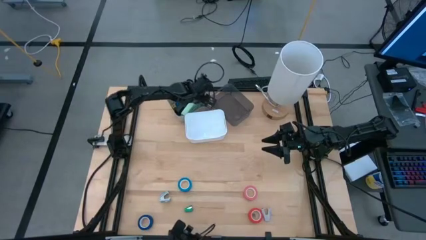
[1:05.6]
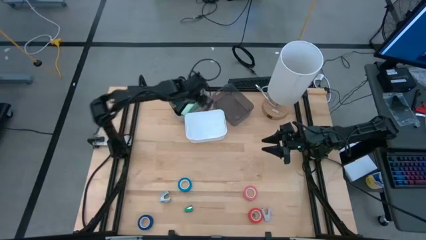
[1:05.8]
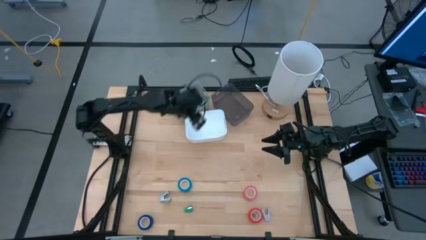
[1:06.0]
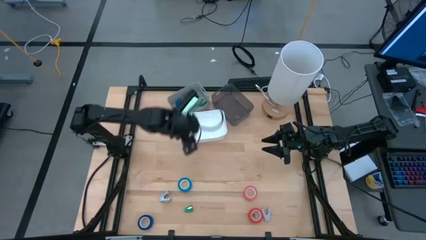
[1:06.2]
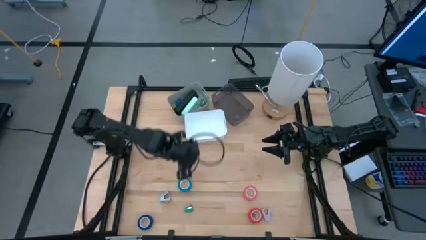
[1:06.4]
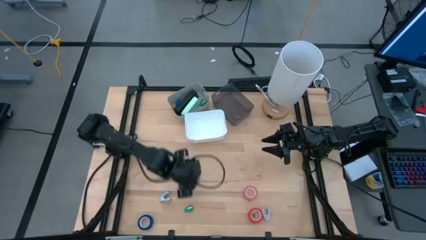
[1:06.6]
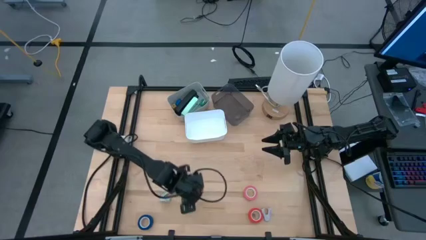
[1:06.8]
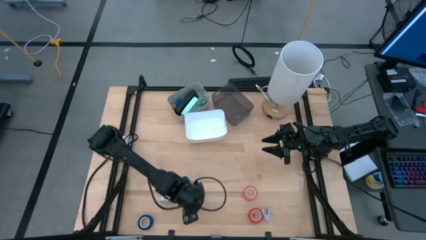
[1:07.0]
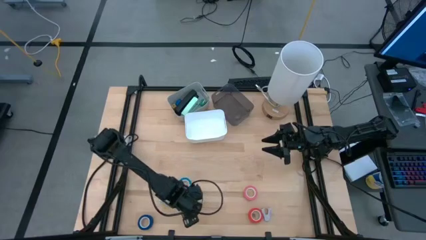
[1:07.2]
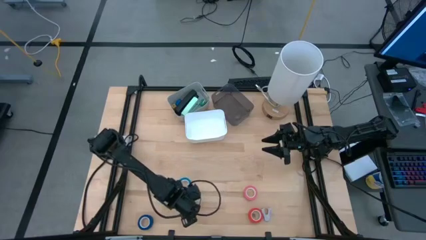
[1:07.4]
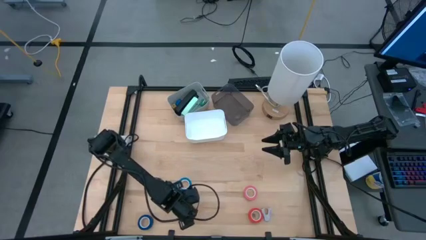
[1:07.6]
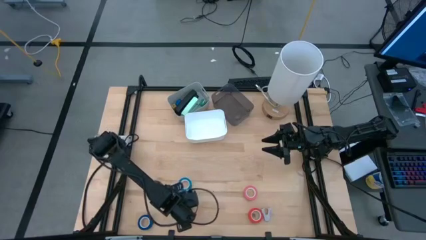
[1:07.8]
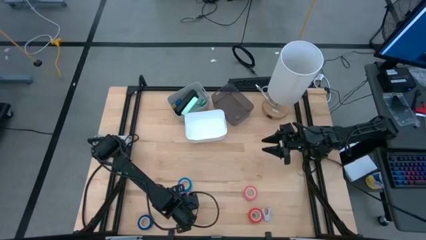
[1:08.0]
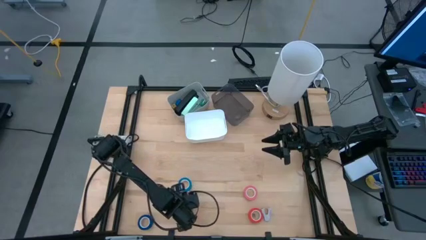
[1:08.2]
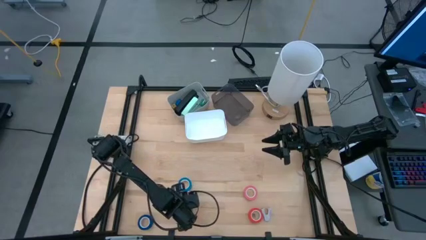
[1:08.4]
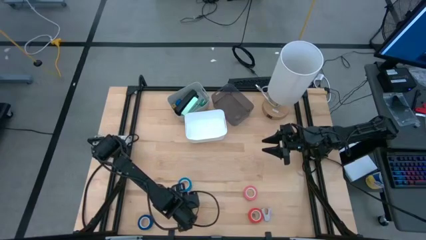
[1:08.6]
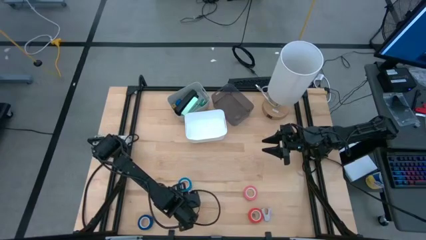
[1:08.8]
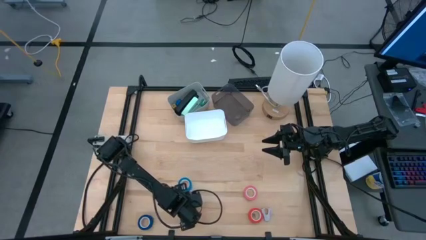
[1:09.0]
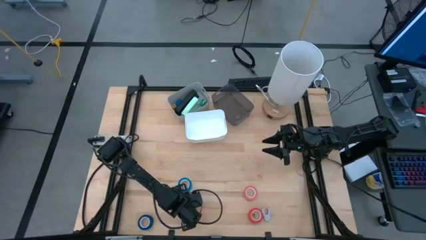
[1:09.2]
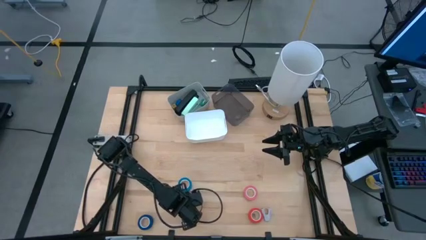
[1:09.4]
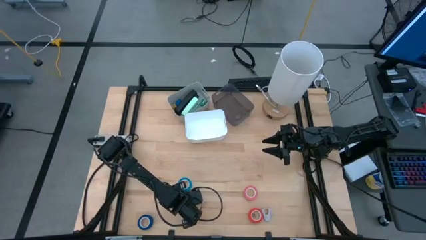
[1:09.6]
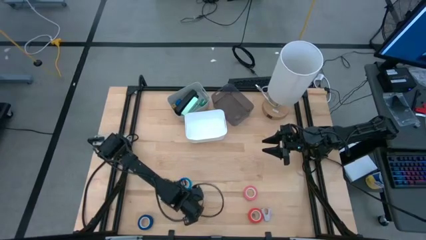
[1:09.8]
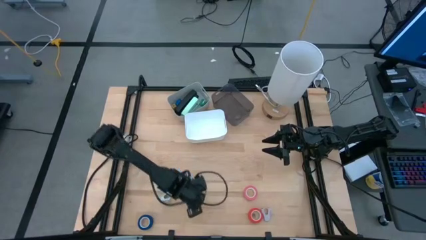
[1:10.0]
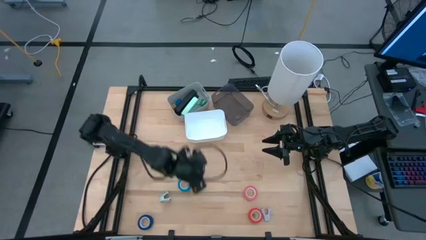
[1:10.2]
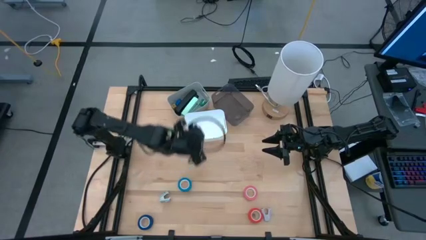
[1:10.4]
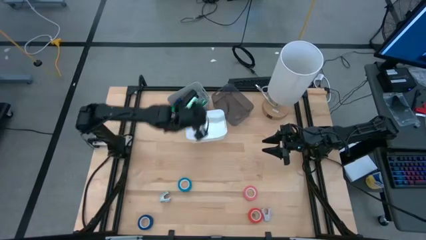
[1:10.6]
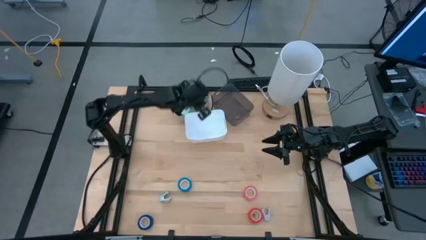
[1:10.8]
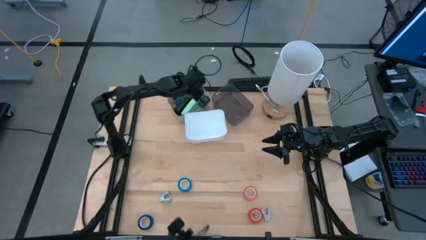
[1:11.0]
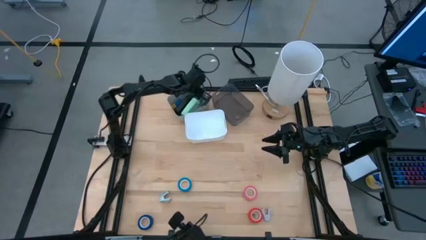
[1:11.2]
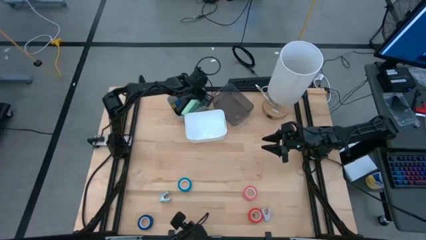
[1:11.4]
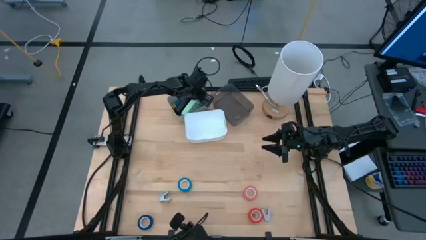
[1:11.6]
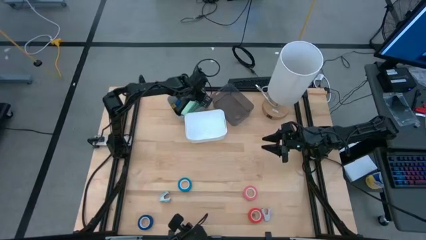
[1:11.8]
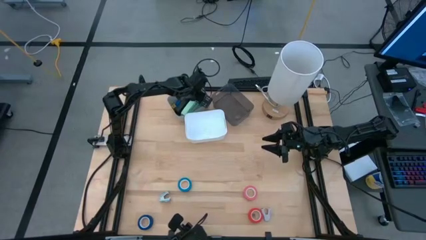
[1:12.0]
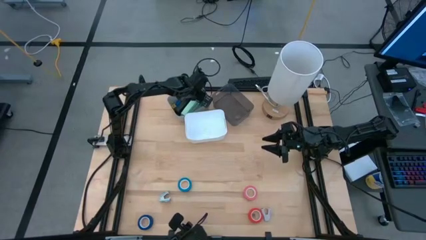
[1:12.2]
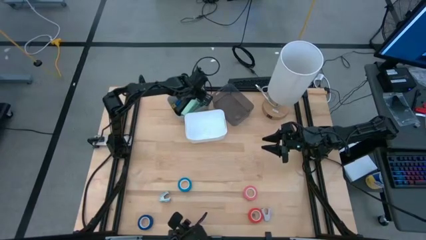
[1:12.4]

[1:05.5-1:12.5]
Task: Pick and place Stapler, Stapler remover, tape
Put the small green stapler into the gray bin

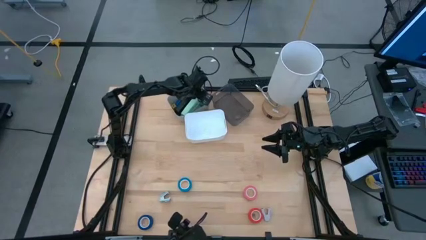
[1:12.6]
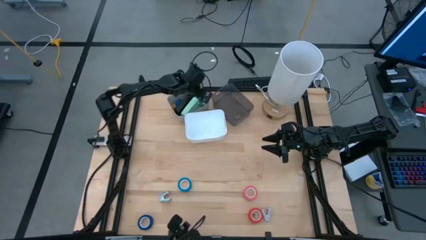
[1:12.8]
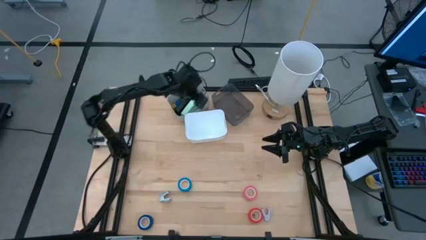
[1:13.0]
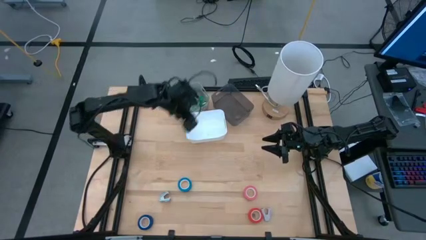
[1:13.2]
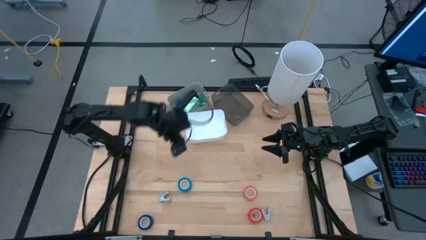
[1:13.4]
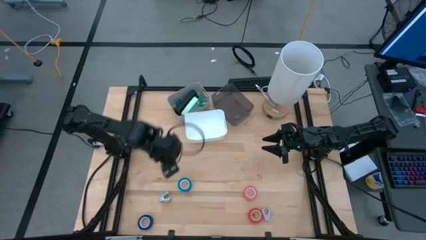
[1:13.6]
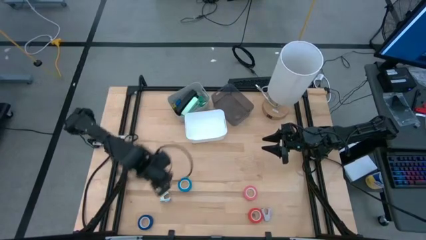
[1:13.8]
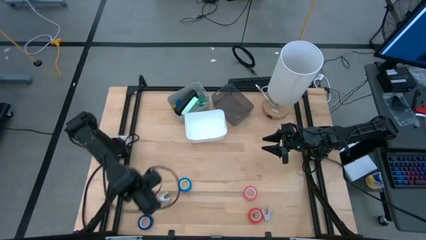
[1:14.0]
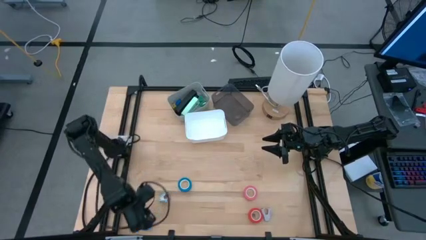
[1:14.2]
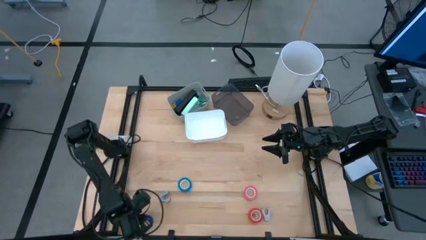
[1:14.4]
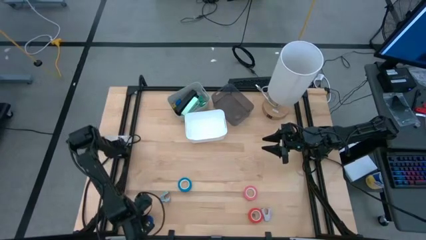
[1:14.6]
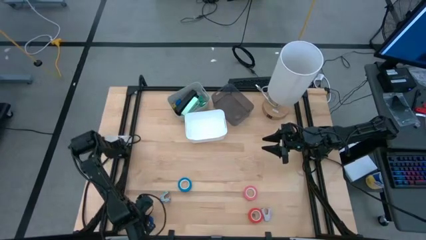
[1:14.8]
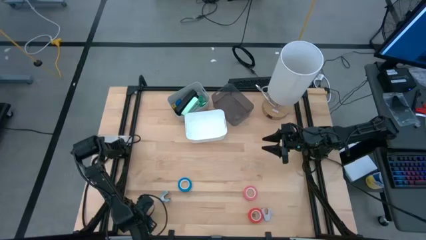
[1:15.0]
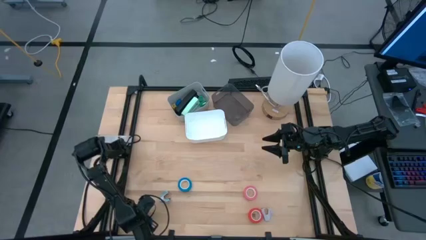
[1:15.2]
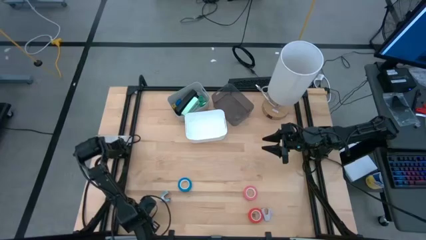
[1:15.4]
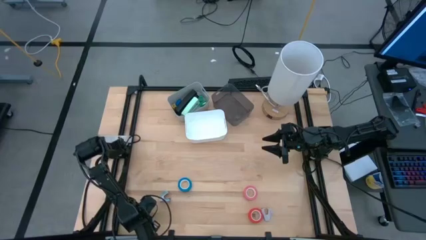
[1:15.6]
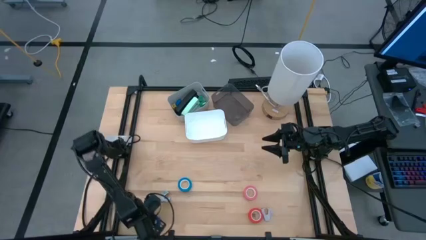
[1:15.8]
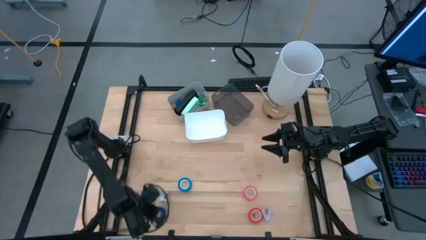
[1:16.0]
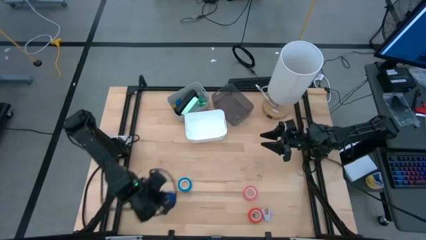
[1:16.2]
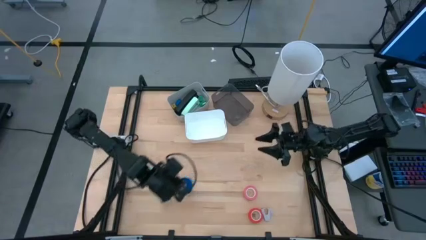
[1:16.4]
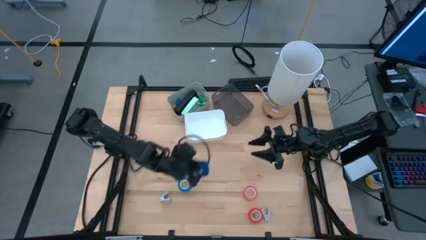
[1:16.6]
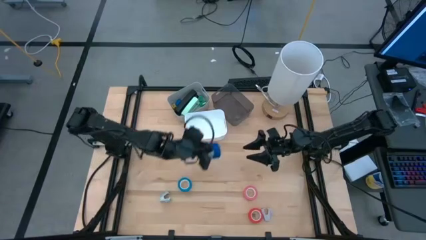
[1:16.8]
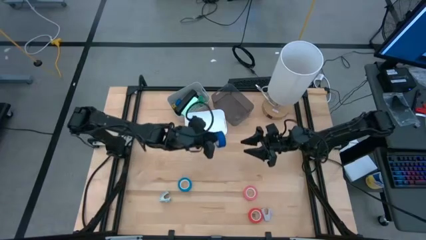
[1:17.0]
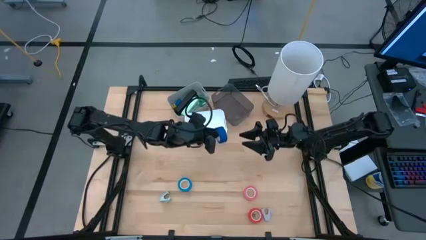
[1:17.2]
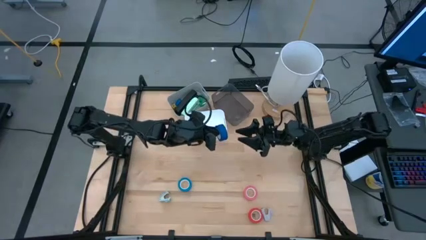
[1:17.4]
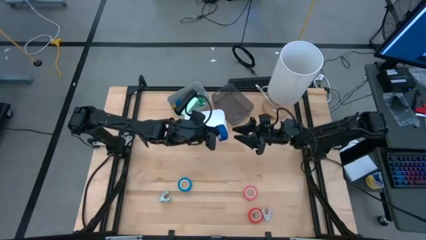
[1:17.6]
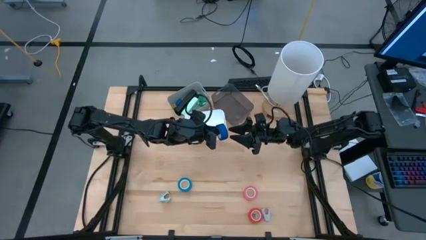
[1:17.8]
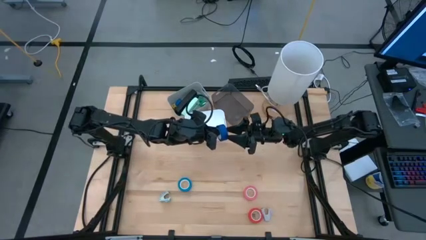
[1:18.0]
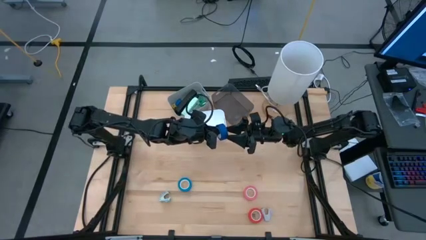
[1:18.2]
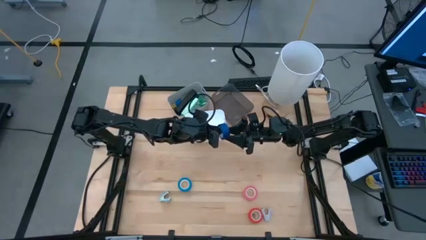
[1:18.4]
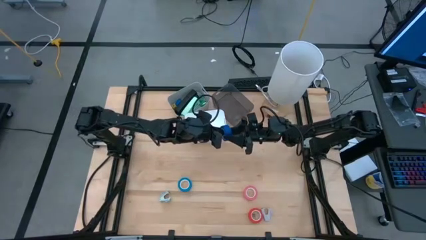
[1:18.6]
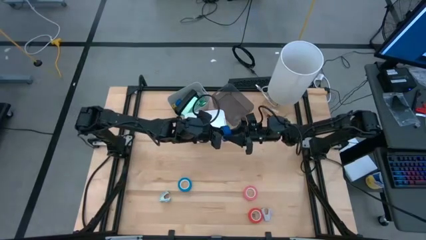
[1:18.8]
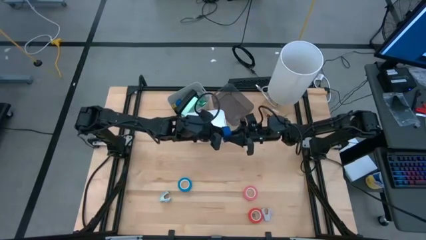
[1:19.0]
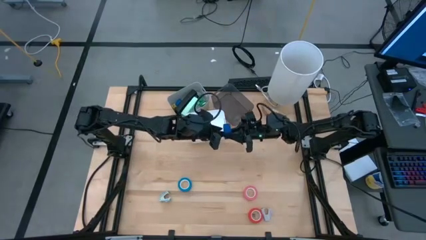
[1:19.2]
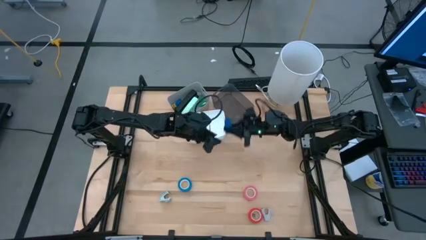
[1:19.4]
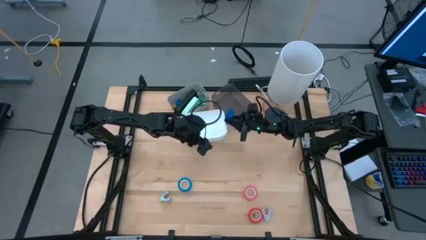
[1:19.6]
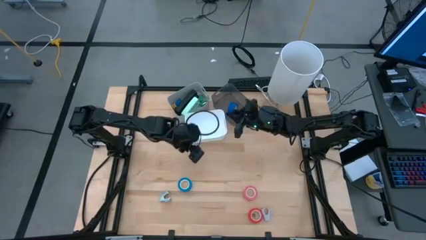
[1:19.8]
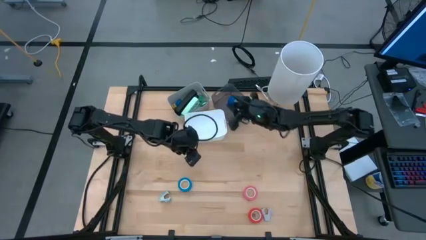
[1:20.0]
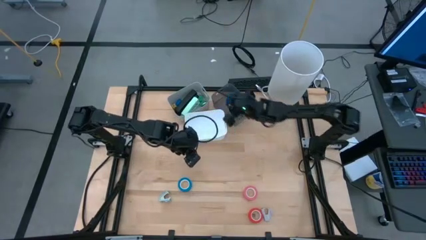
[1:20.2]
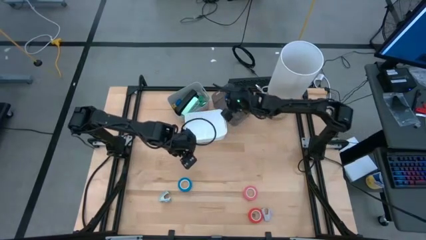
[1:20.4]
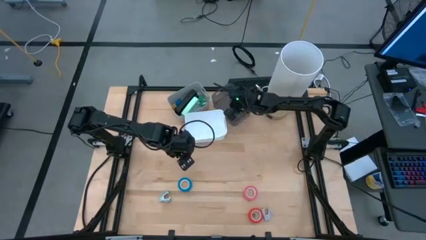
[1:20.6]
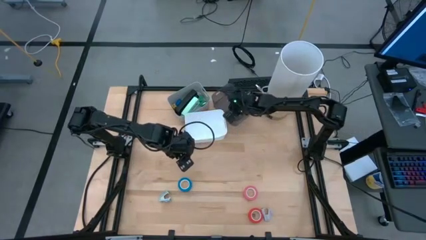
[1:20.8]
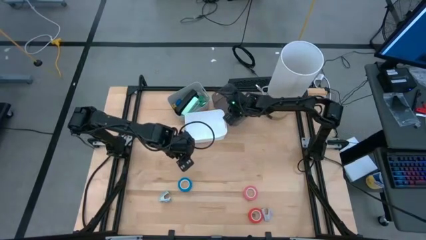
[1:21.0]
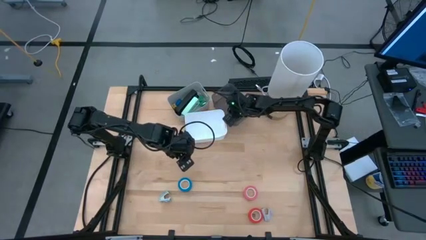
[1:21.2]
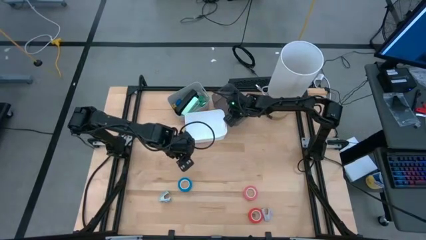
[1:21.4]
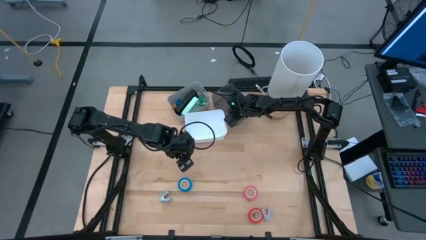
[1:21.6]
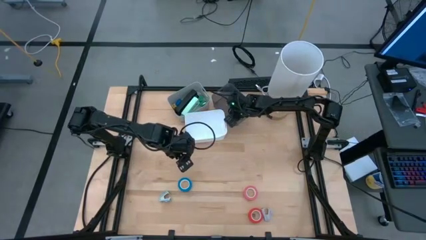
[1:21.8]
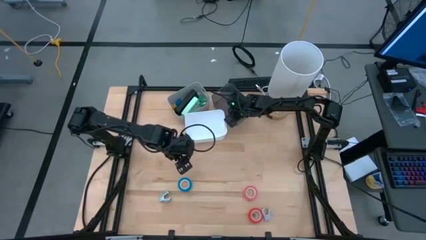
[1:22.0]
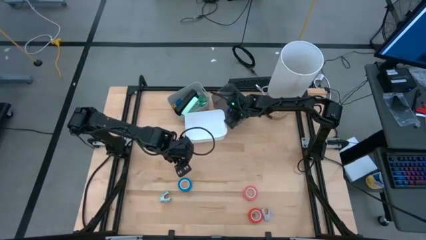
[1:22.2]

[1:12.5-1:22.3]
Put the dark blue tape into the black bin
